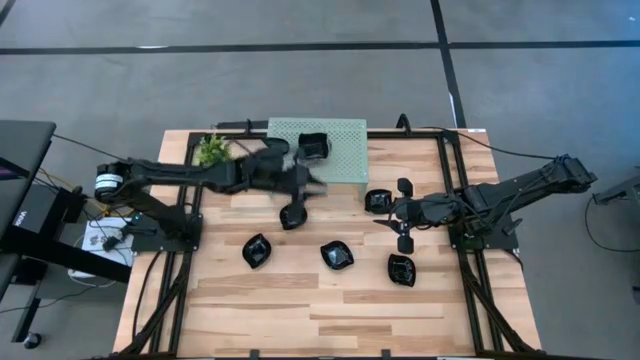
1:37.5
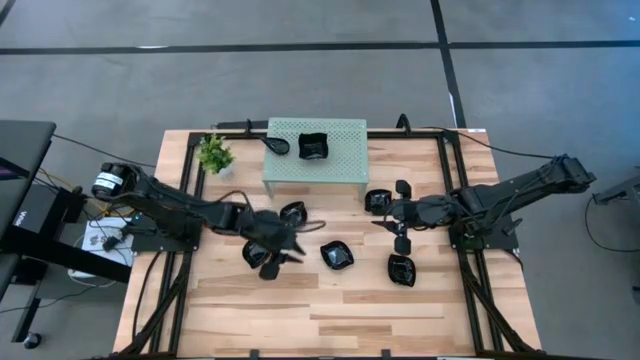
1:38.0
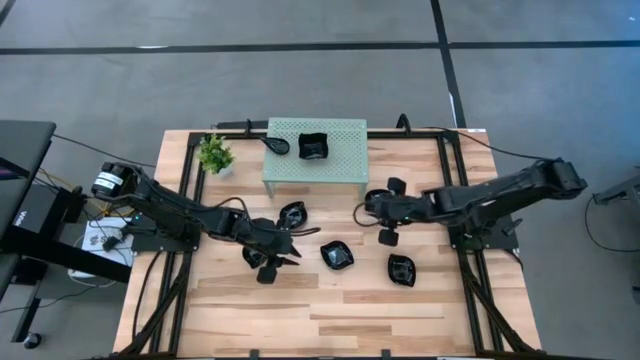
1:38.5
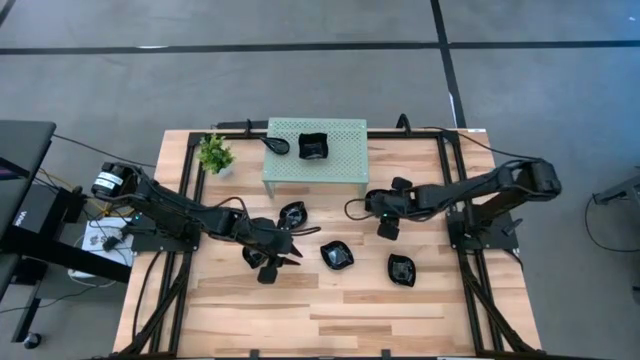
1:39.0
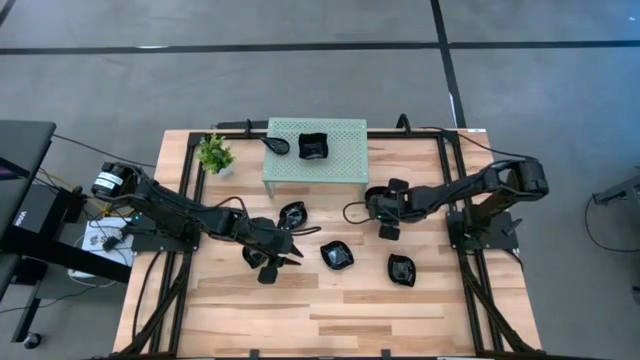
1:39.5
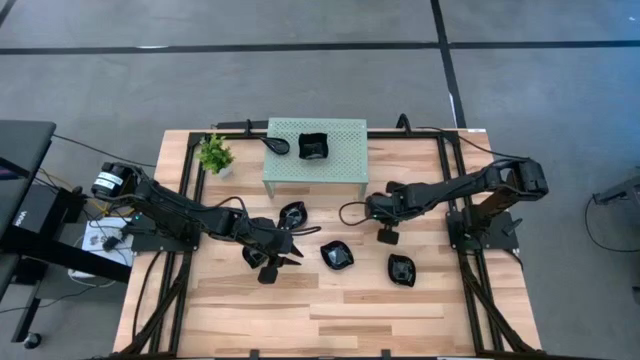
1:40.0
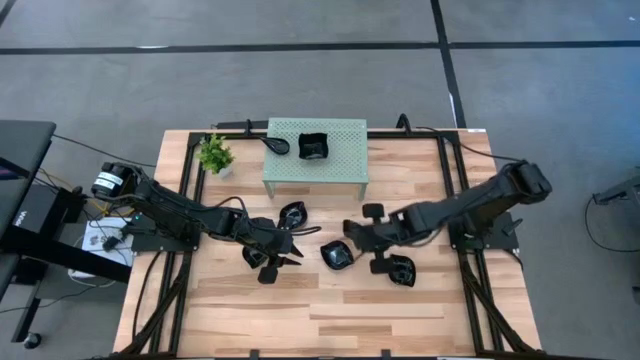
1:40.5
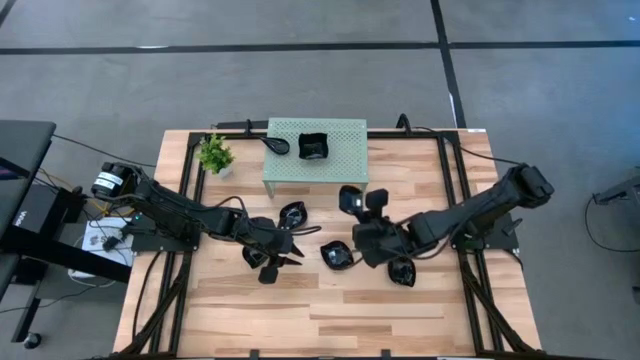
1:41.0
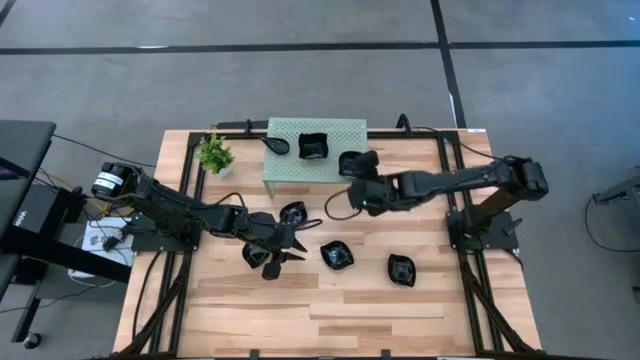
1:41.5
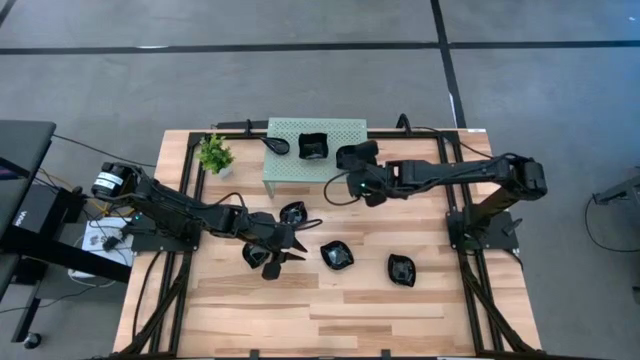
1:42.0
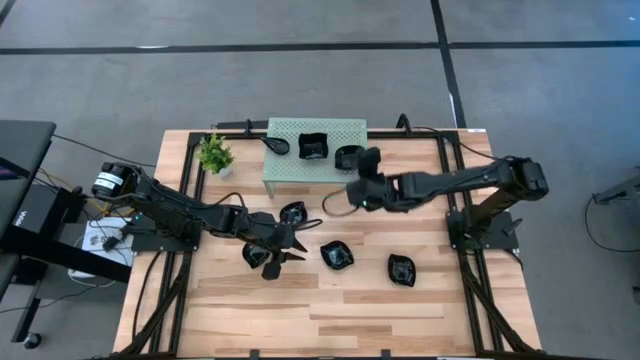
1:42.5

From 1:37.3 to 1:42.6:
Task: Pick & Place Mini shaped plates
Put the leaf-shaped plate on the shelf

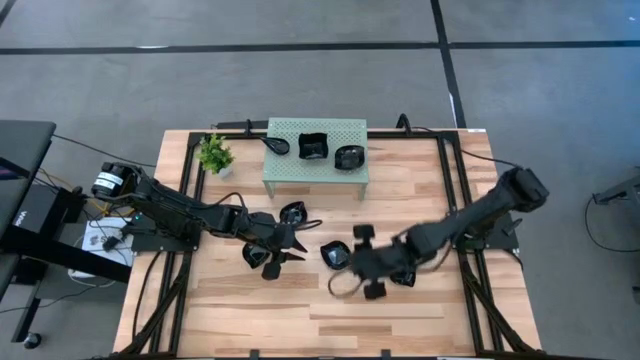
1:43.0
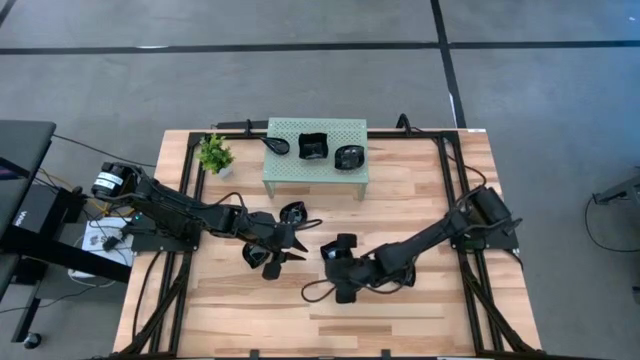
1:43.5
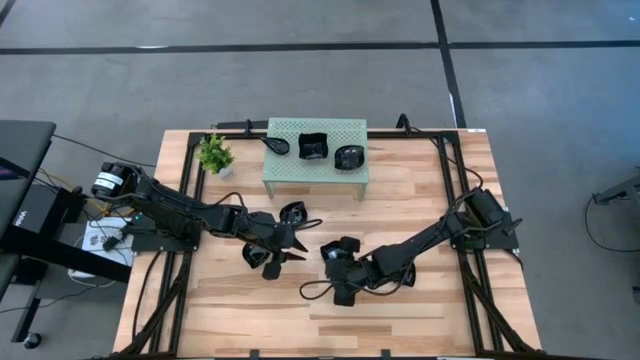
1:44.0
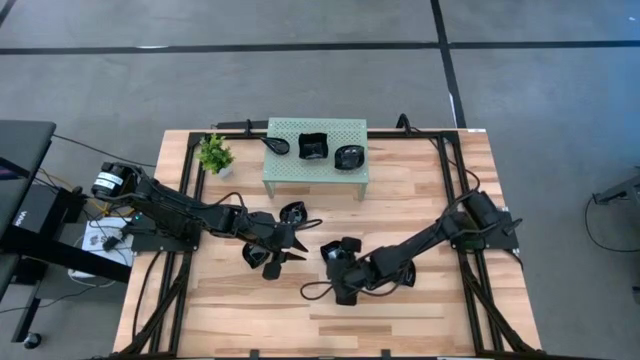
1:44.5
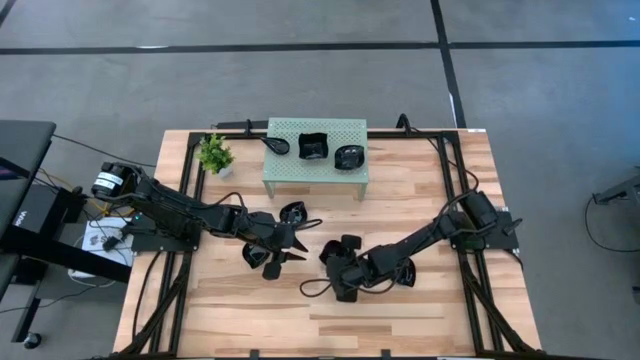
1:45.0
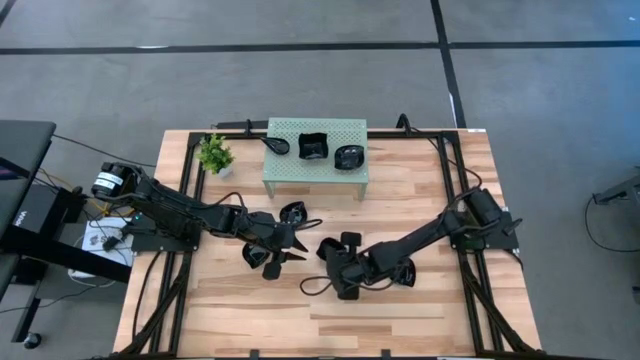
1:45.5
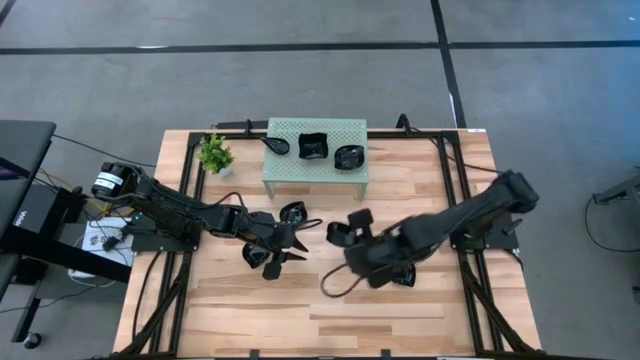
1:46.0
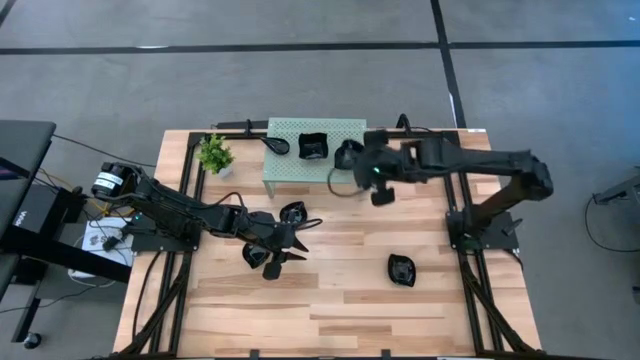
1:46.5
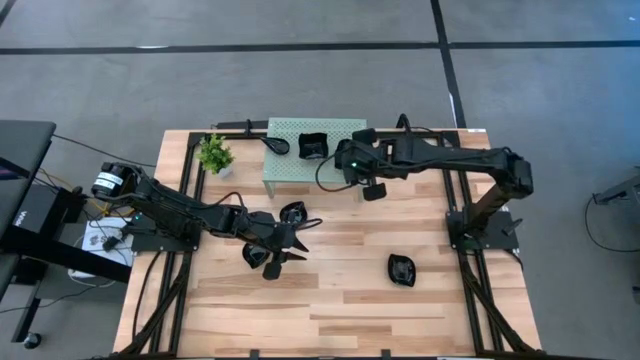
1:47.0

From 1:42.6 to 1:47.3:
Stack the leaf shaped plate on top of the other leaf shaped plate on the shelf

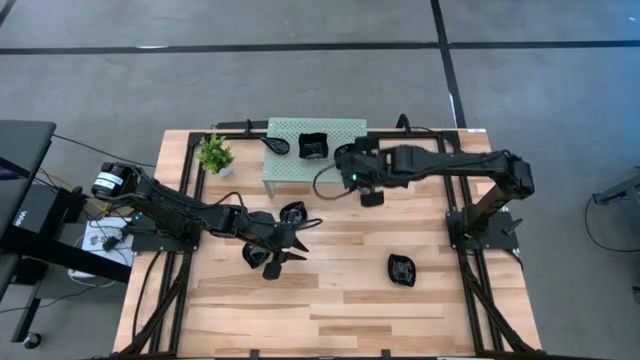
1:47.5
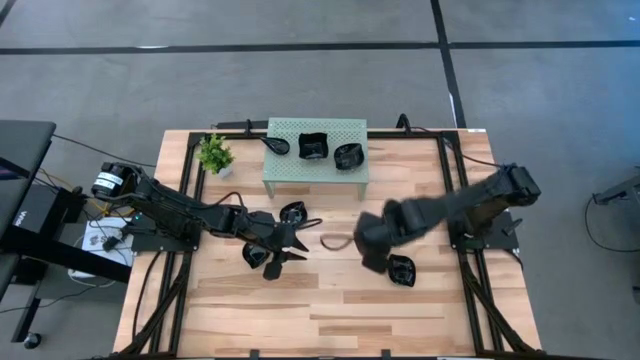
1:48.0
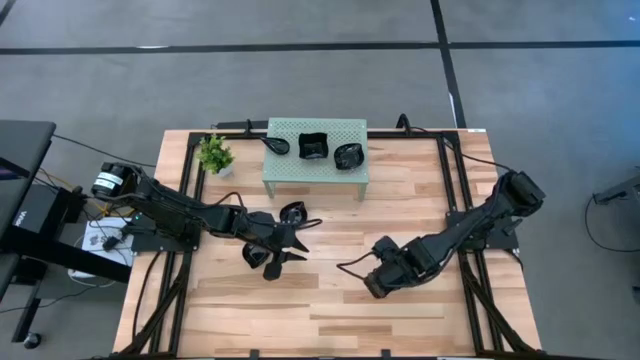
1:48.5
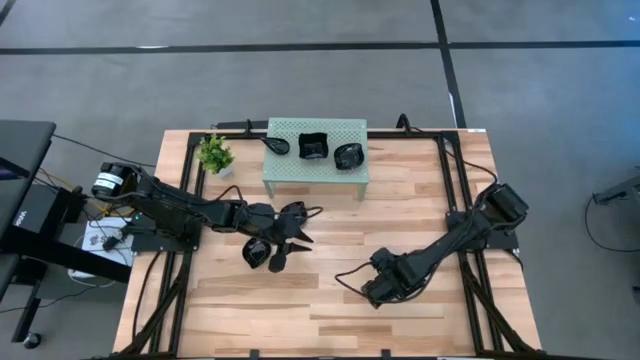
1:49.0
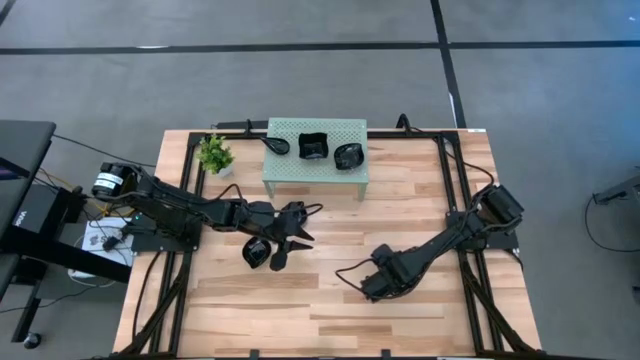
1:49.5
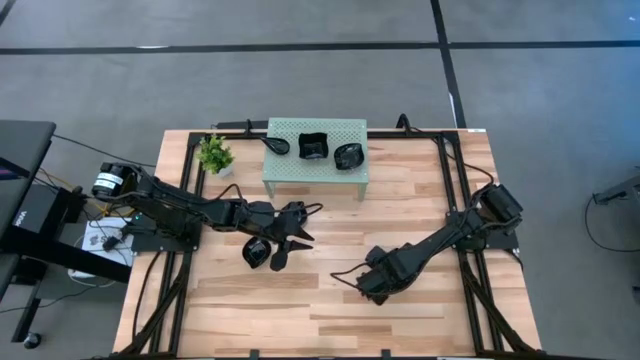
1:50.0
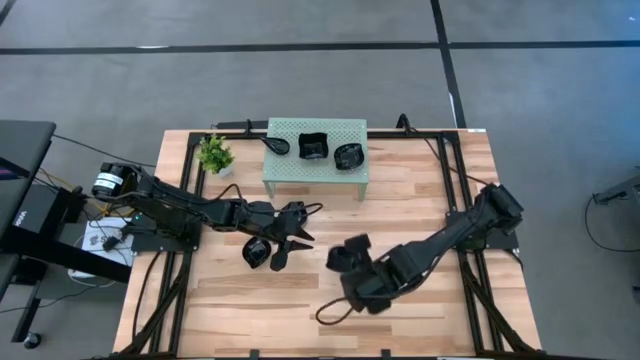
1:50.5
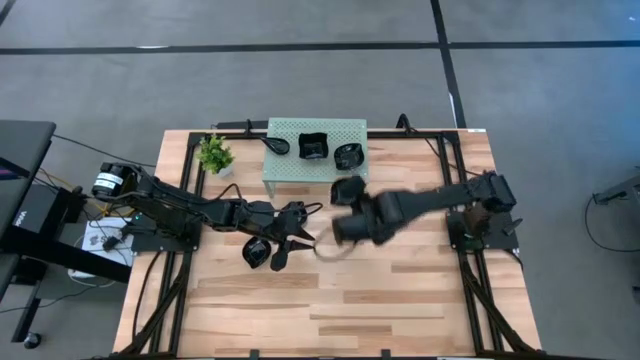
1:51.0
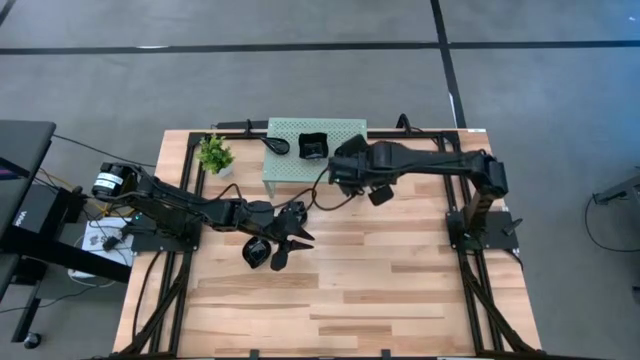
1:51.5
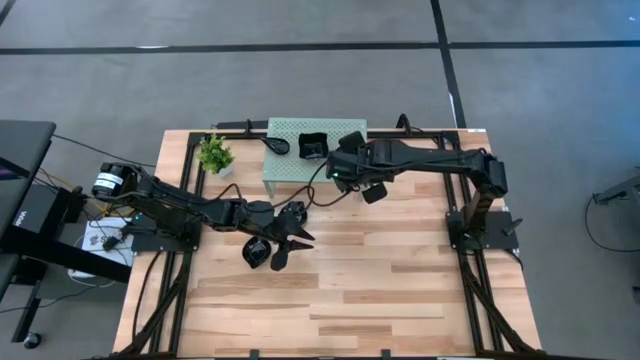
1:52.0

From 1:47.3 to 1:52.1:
Stack the leaf shaped plate on top of the other leaf shaped plate on the shelf

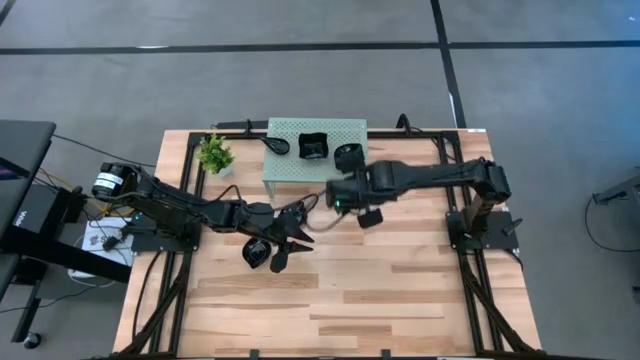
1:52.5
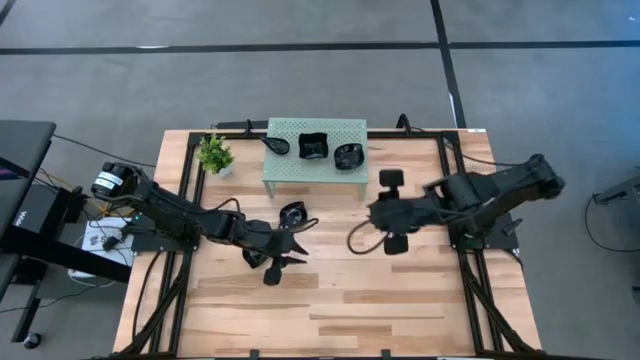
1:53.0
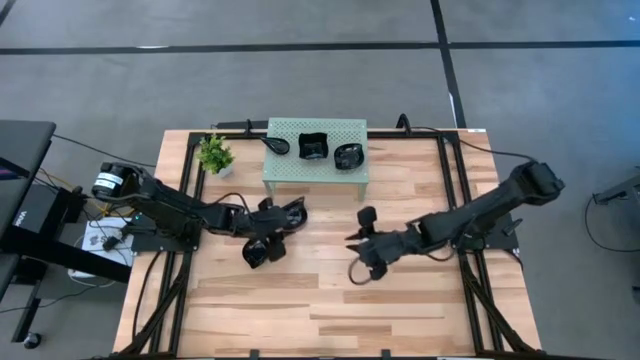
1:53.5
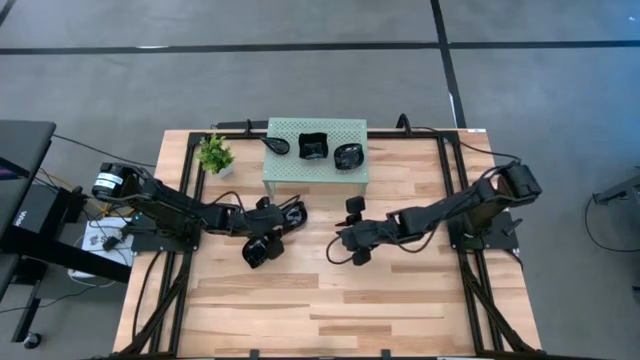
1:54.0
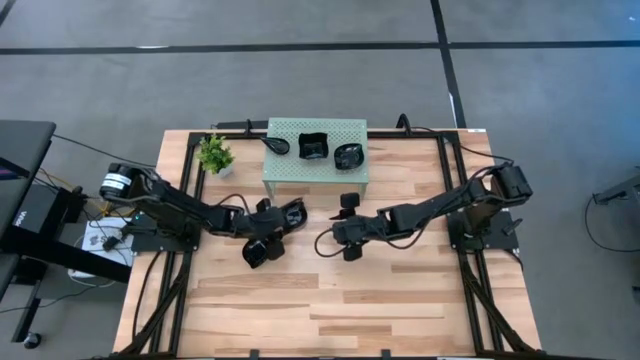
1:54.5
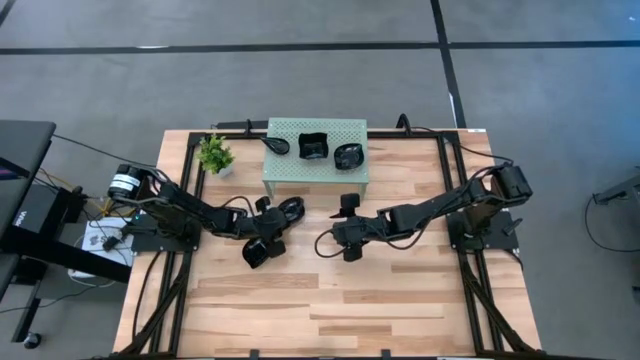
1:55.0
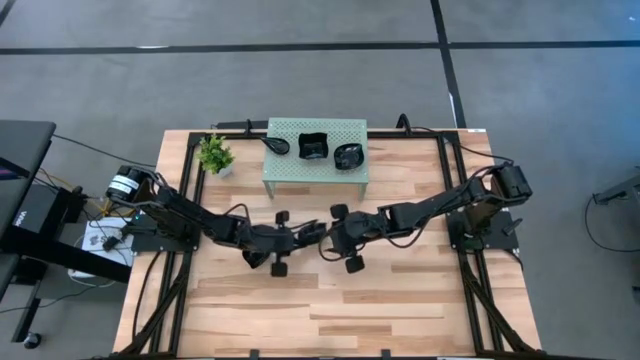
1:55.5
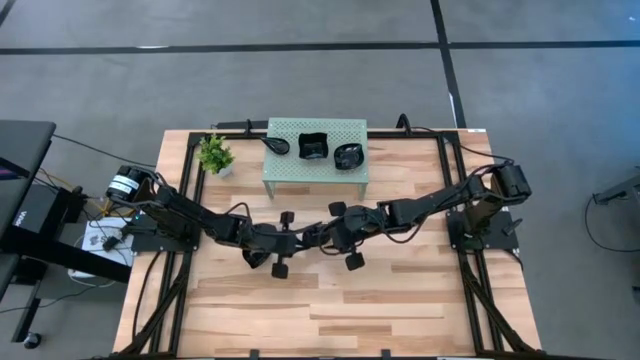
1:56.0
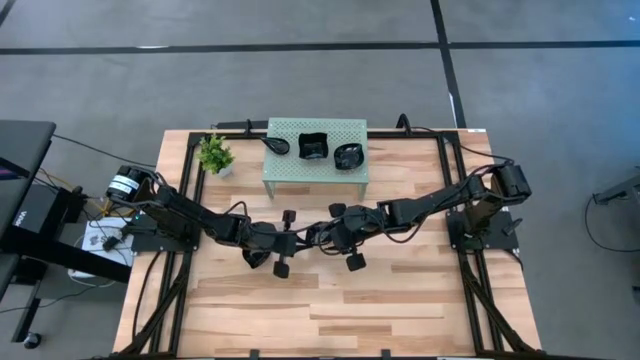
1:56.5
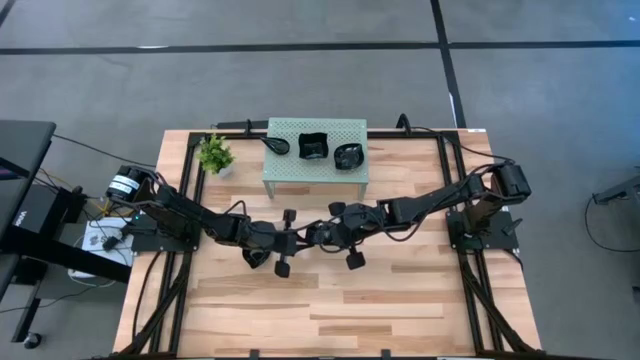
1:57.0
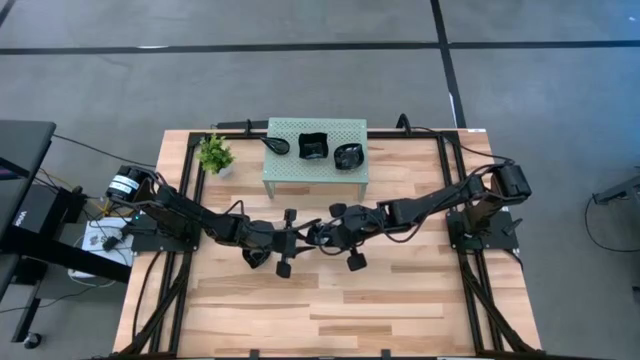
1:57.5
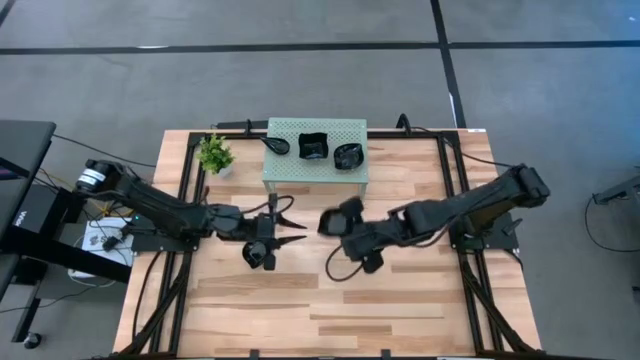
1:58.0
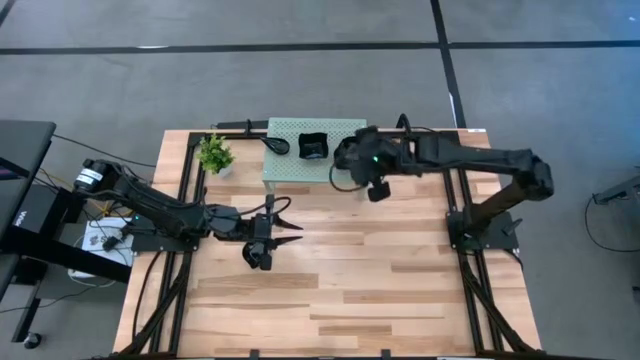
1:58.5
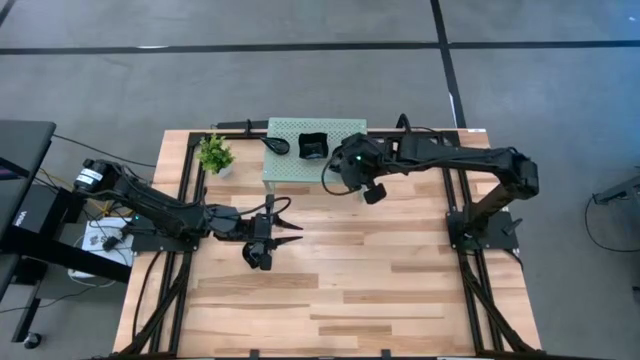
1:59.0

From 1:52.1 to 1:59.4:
Stack the leaf shaped plate on top of the other leaf shaped plate on the shelf
